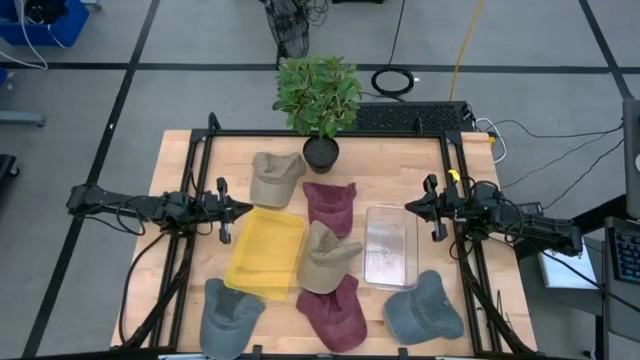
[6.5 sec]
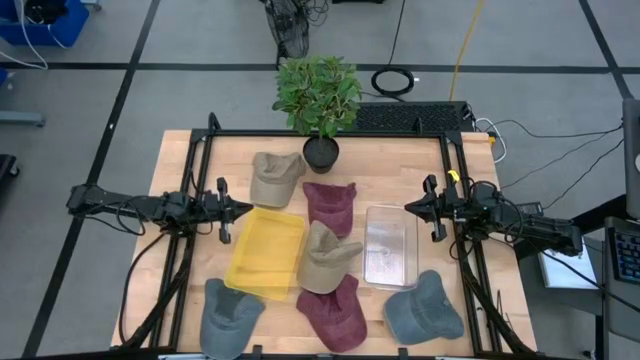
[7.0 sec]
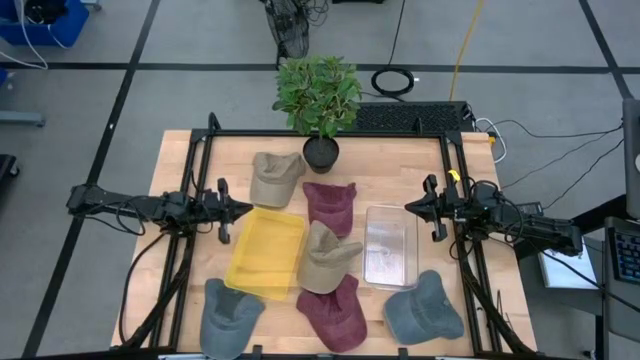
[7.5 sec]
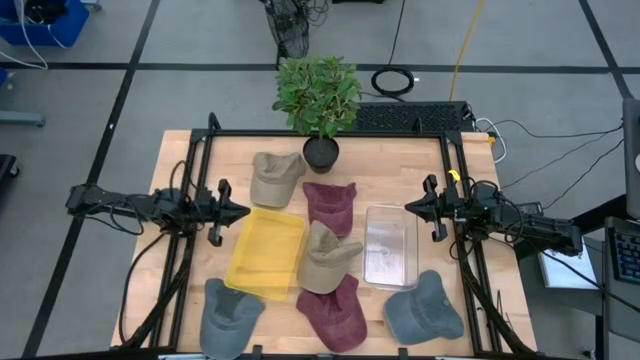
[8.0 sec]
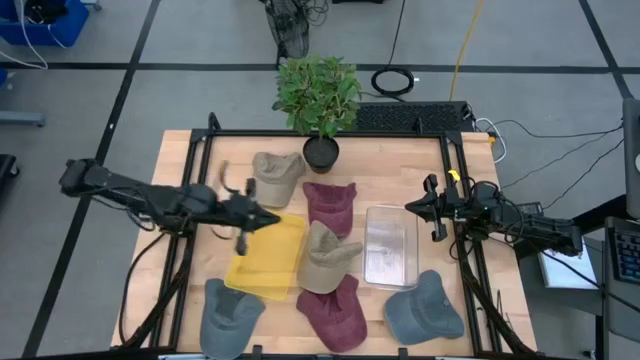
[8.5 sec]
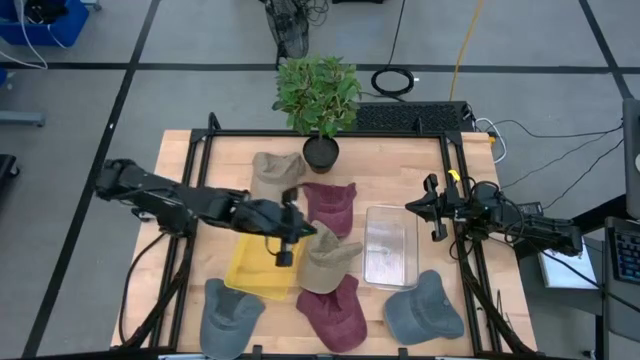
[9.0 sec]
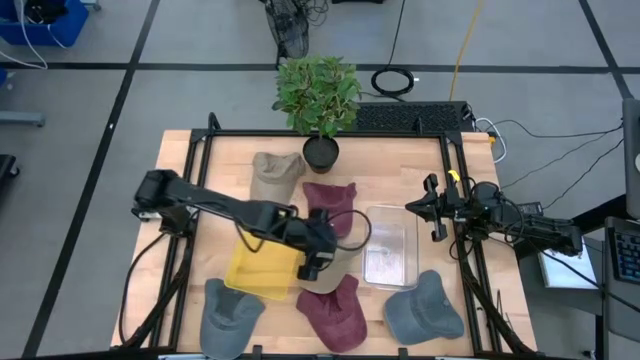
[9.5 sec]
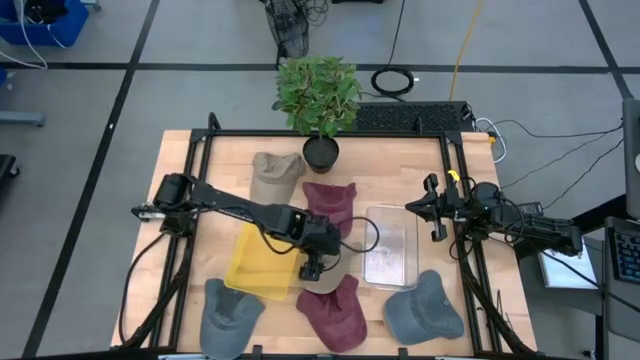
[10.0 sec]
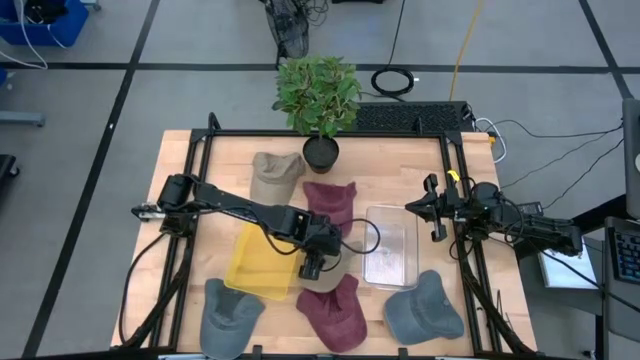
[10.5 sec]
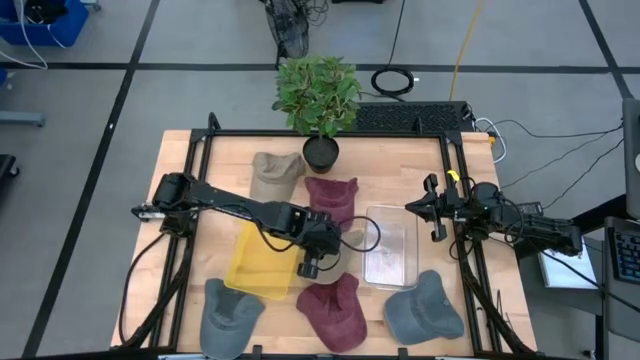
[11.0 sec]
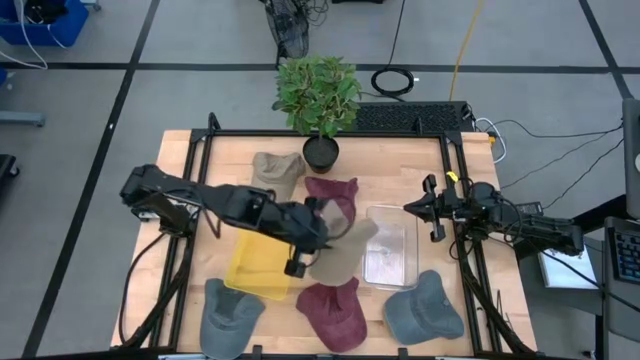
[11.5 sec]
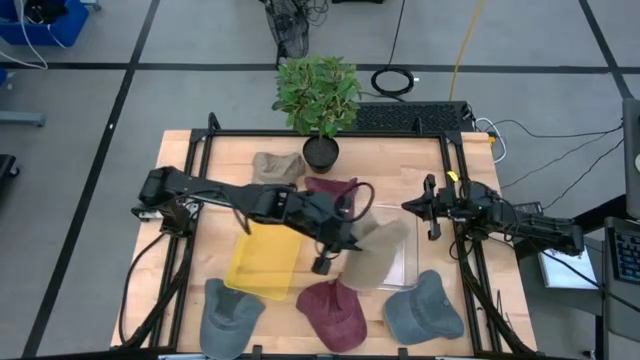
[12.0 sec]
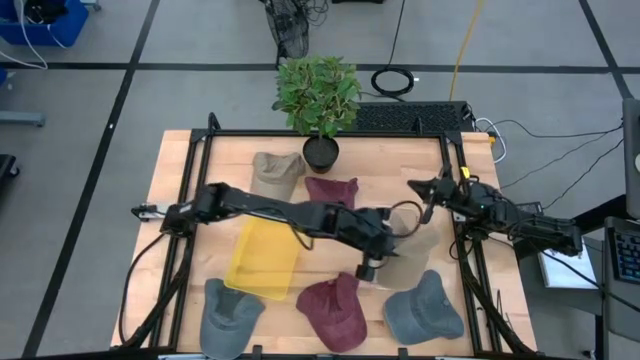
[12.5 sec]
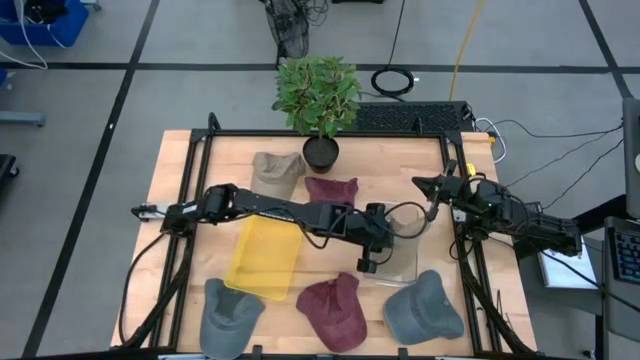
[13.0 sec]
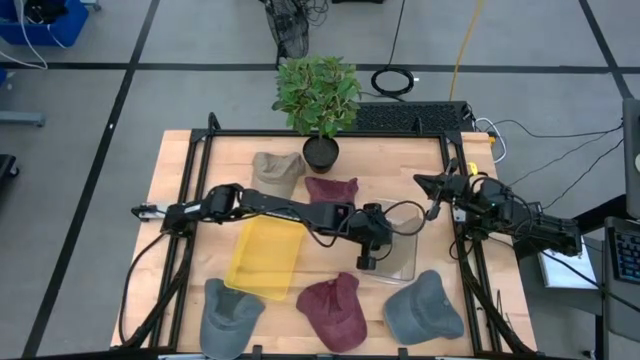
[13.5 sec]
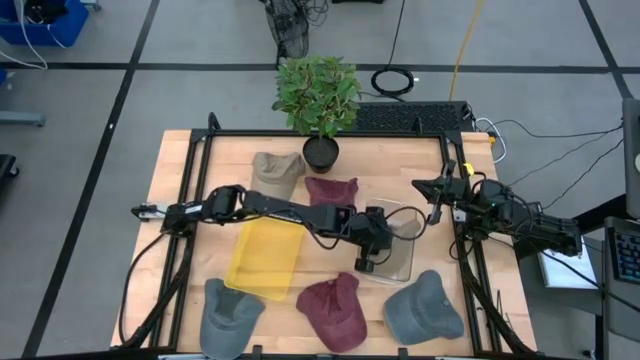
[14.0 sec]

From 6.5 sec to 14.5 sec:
Task: Pick & Place hat
Put the right brown cap into the transparent bin

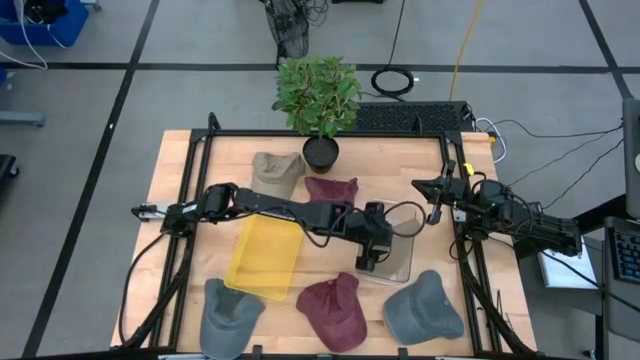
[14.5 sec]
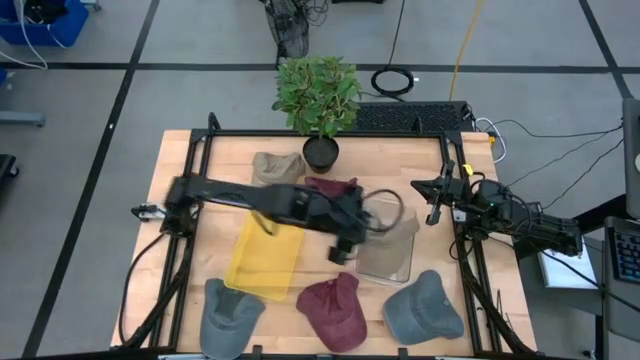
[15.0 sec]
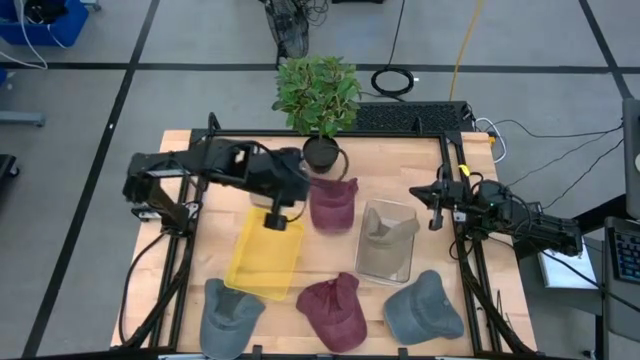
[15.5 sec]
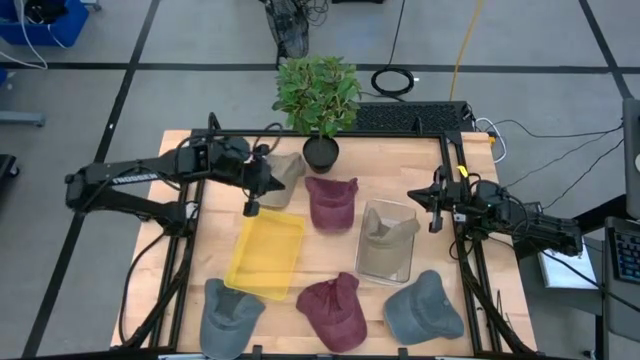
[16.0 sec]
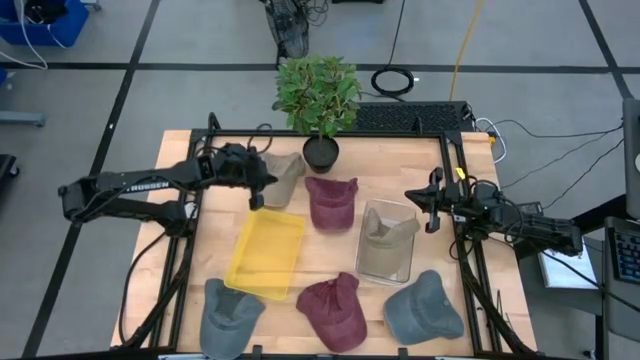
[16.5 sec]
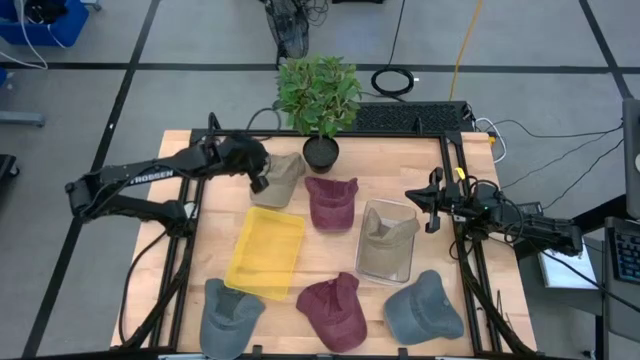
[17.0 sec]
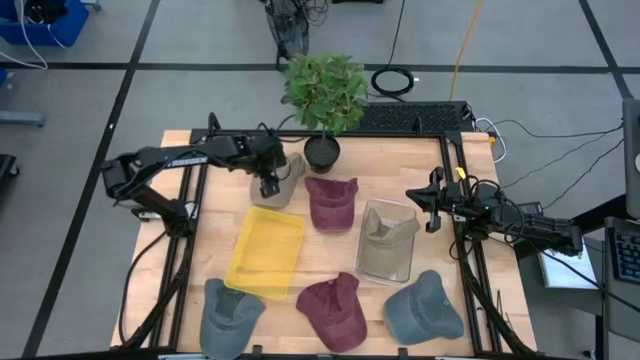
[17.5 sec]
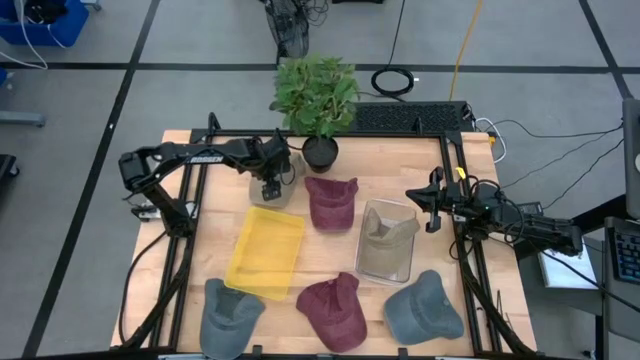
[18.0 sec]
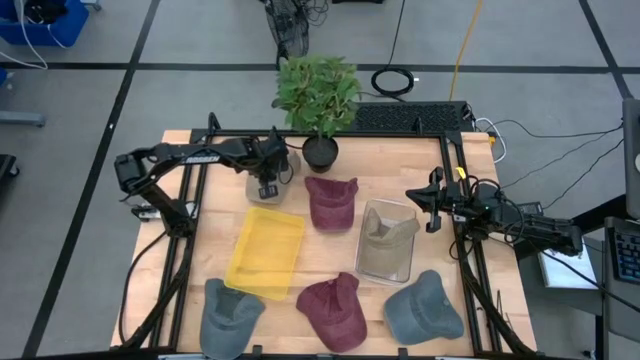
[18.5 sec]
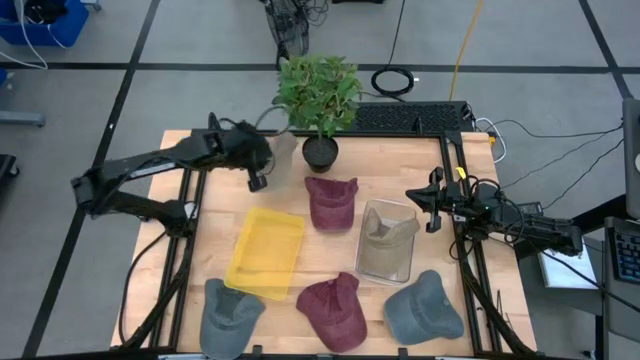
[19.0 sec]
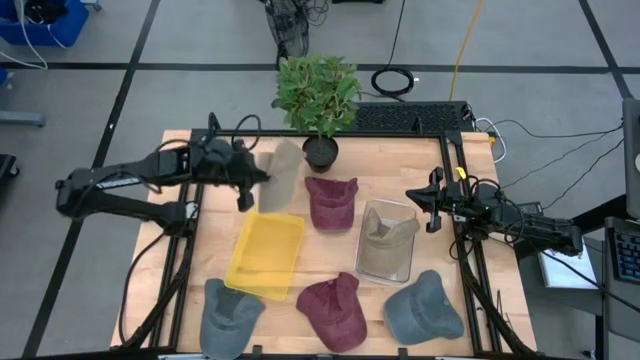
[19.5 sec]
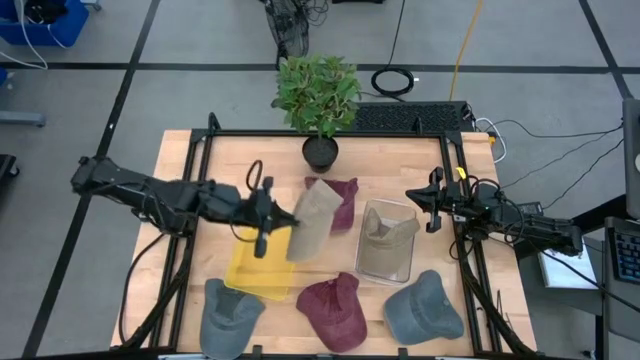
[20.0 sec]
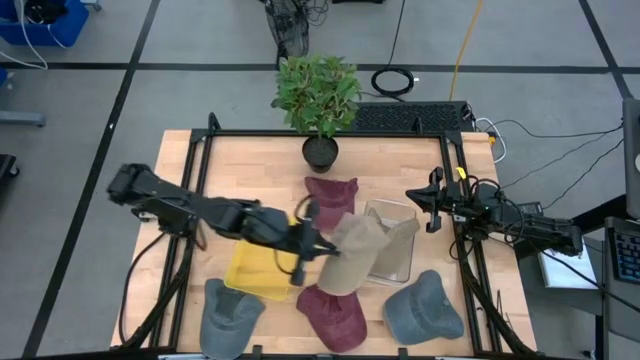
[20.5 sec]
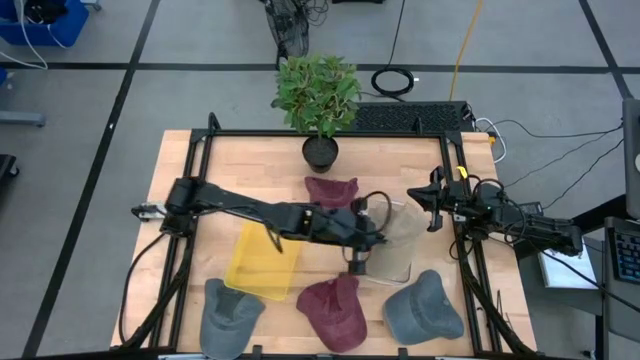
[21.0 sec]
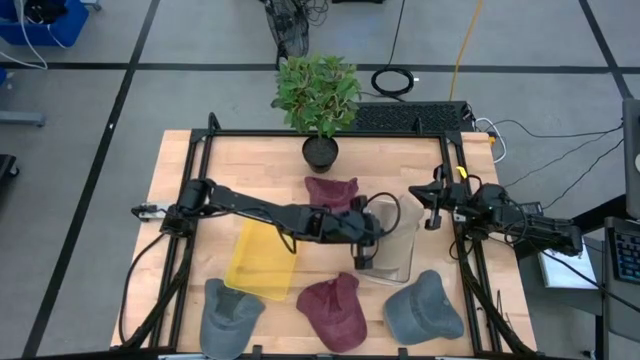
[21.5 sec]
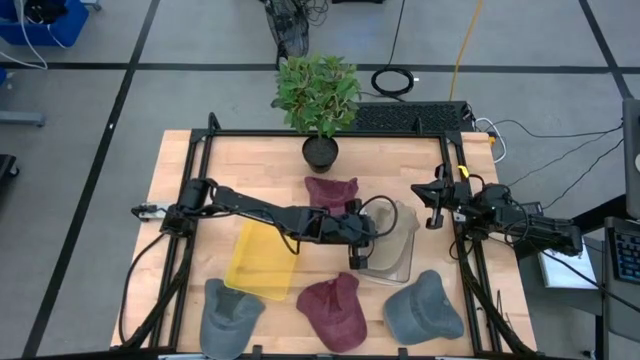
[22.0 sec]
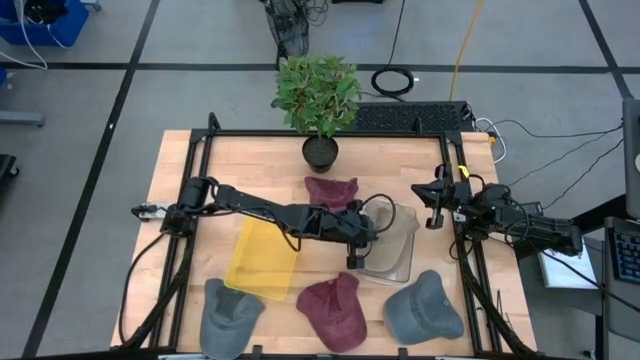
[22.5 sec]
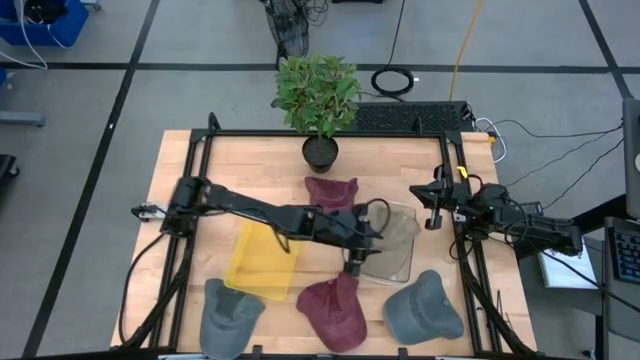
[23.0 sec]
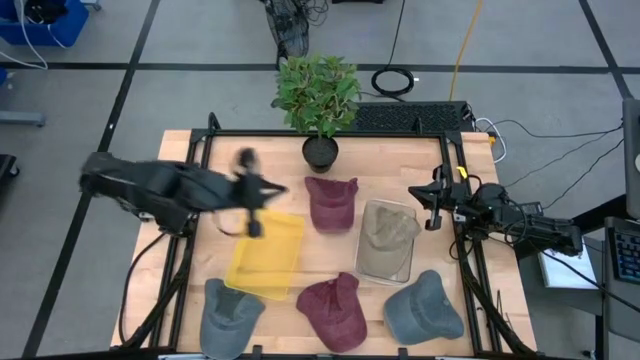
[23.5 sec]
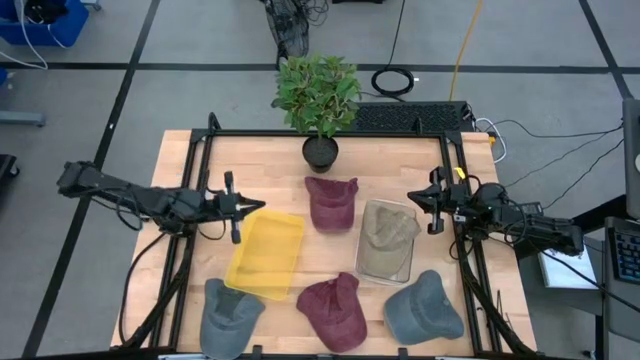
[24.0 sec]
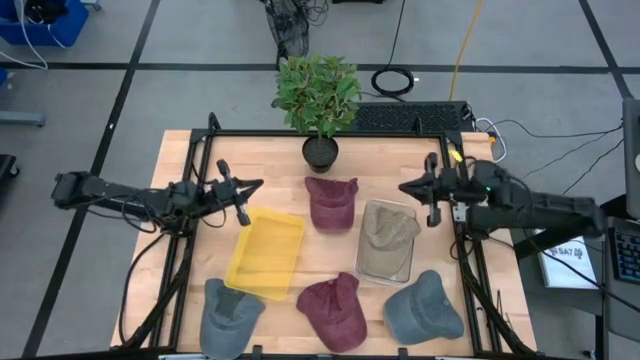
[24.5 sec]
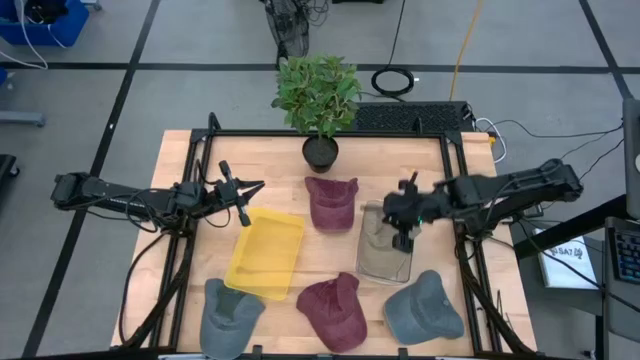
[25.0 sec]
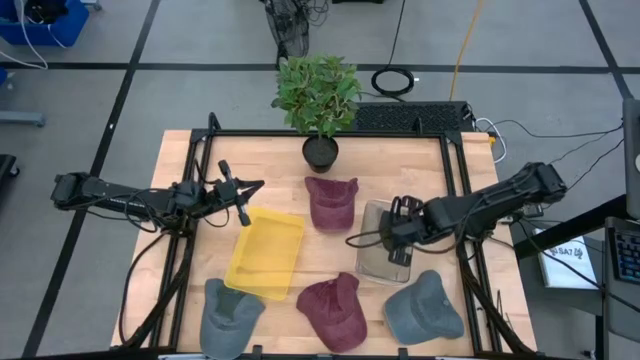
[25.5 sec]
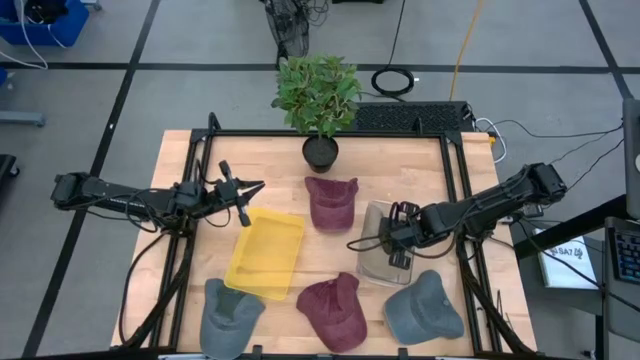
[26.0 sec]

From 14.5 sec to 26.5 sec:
Put the brown cup into the transparent bin

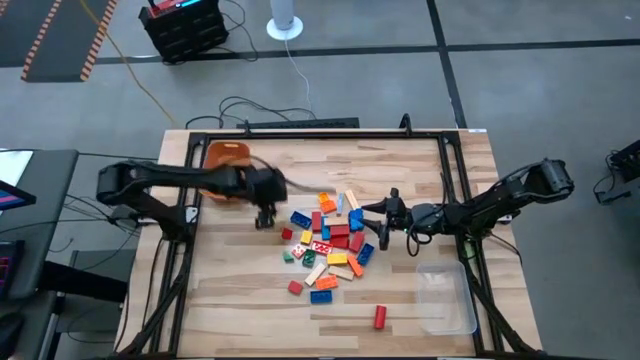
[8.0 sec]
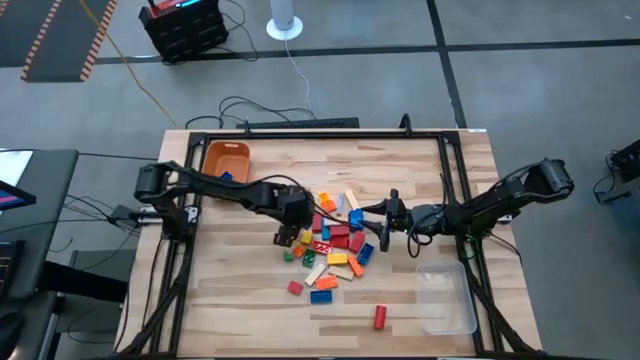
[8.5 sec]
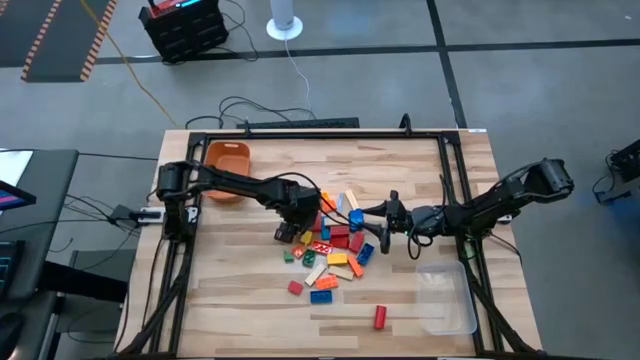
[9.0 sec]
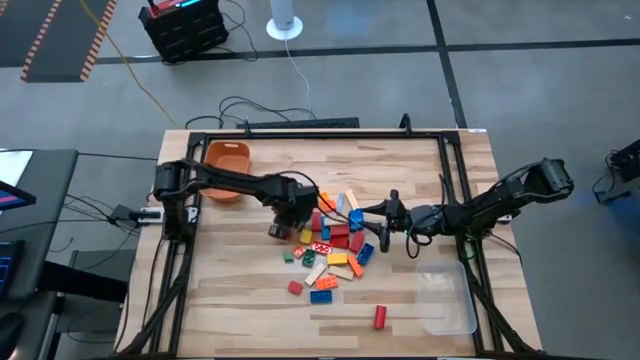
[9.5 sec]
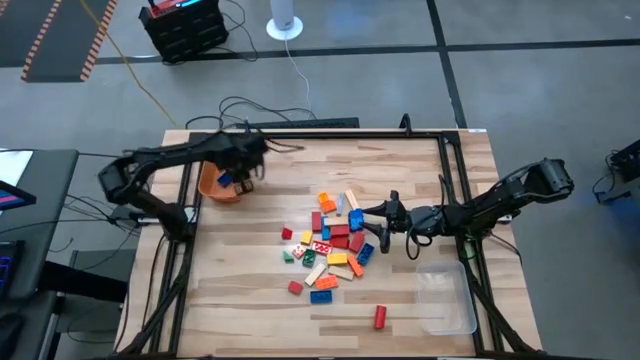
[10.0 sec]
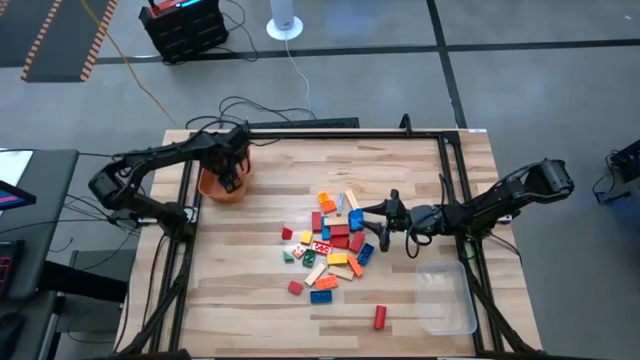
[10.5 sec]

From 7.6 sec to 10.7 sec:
Task: Sort blocks by size
Put the large blue game piece into the orange bin
